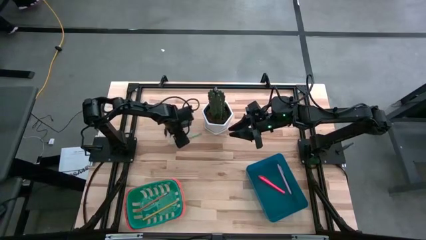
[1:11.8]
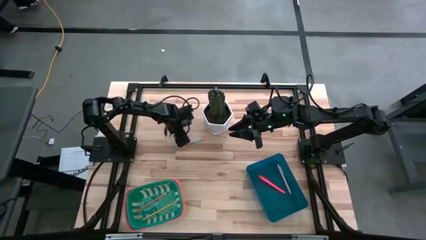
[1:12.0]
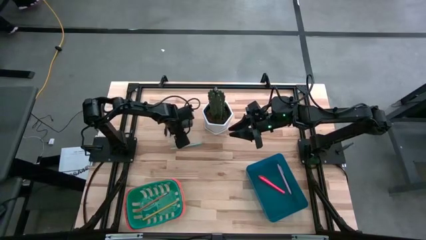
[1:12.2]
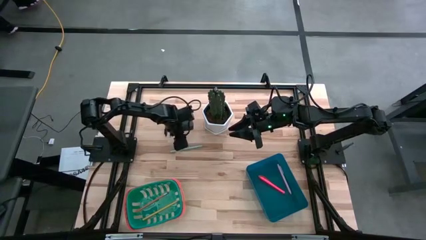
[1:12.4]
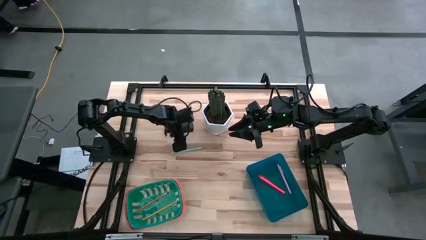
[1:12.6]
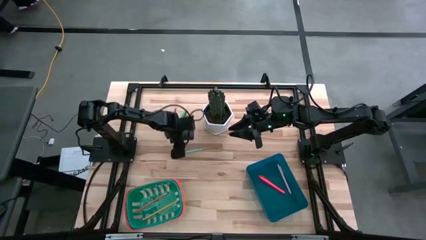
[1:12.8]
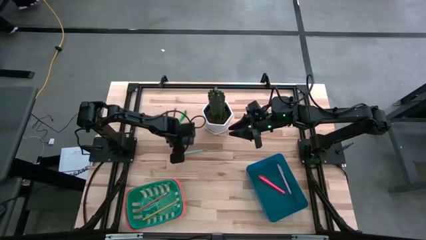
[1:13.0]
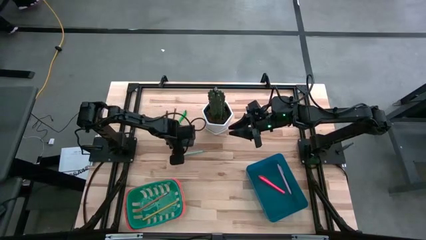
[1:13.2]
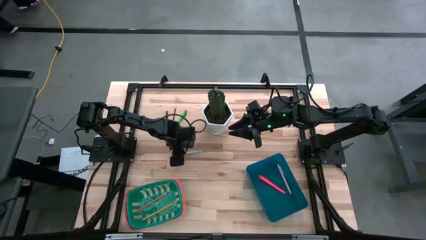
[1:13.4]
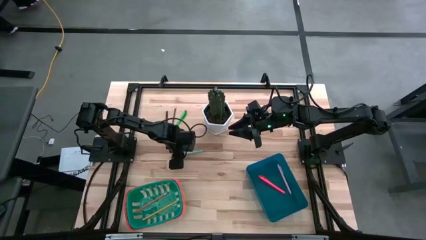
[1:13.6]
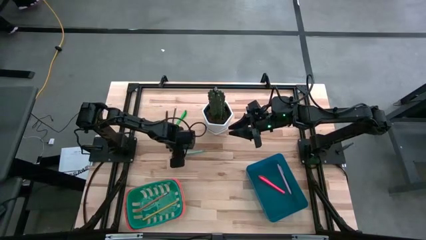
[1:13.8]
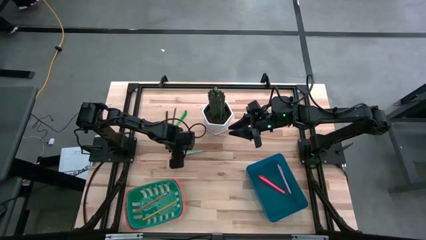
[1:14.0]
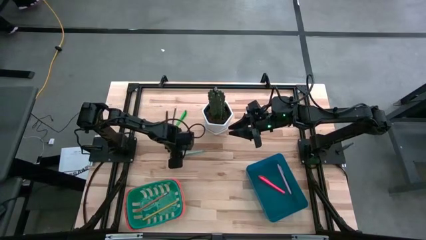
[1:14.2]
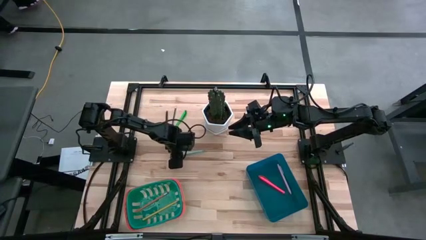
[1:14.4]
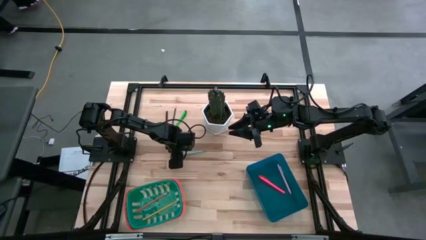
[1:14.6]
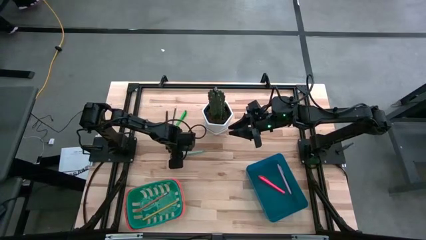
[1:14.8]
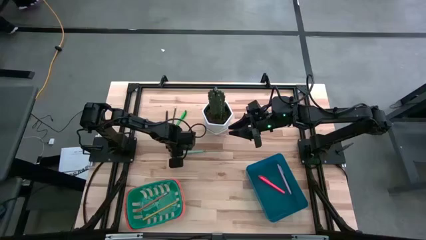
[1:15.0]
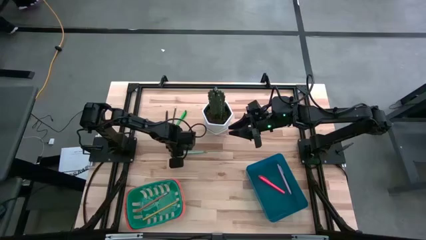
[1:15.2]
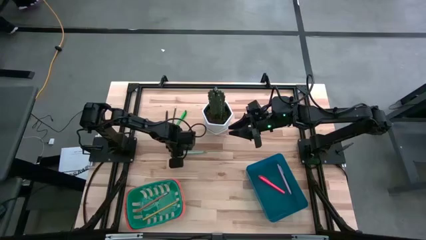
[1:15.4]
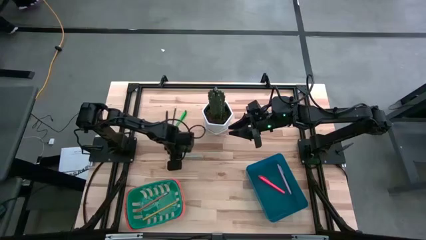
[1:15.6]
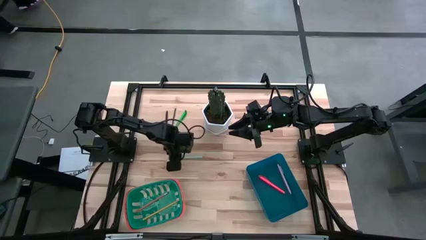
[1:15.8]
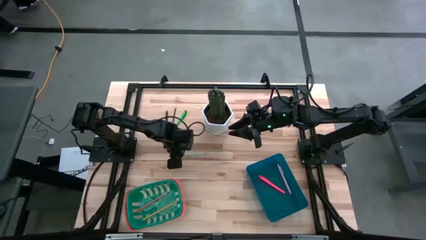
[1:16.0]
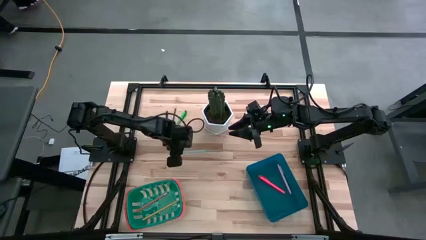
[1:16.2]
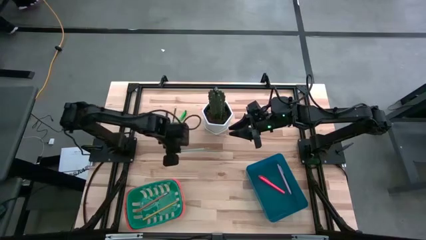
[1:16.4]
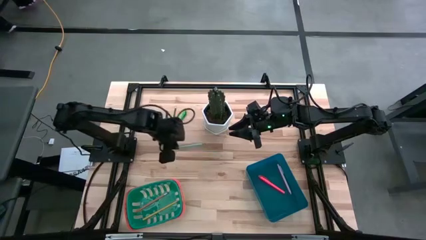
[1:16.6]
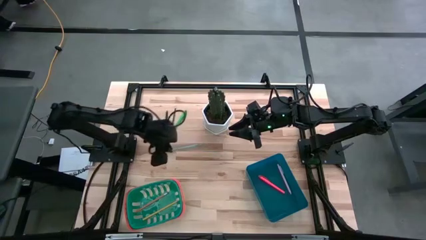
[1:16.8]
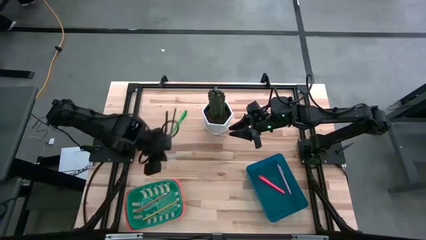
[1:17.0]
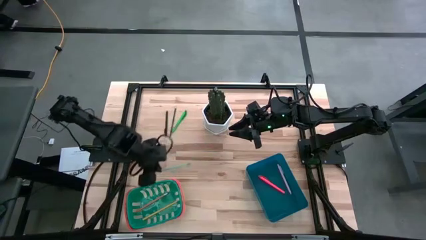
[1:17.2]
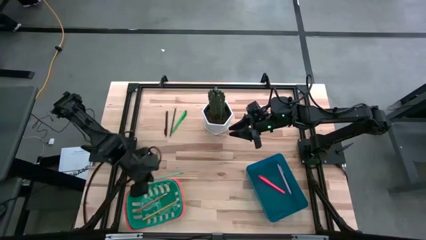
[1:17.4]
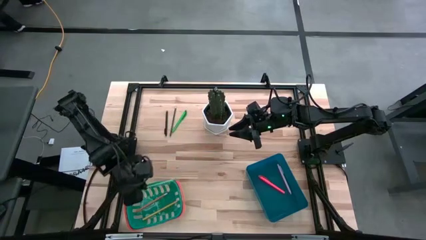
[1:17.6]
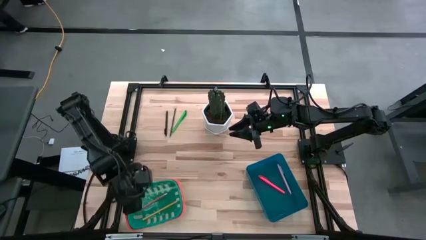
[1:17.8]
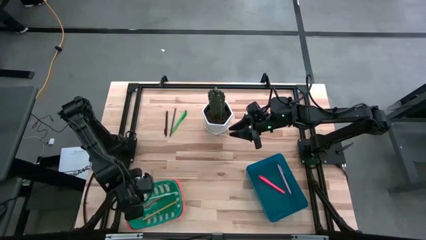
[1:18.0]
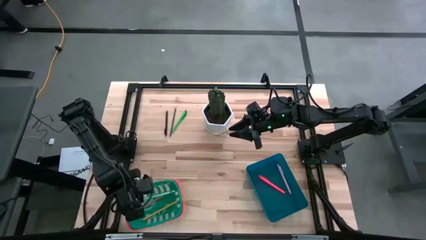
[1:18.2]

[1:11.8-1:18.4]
Task: Sort pens & pencils
Put the light blue pencil into the green bin

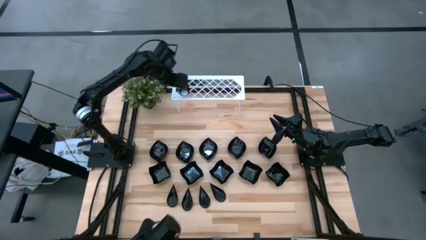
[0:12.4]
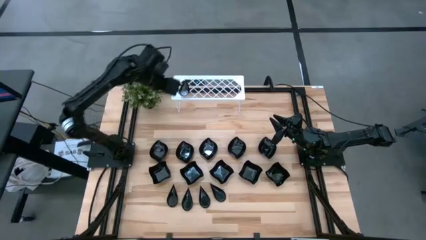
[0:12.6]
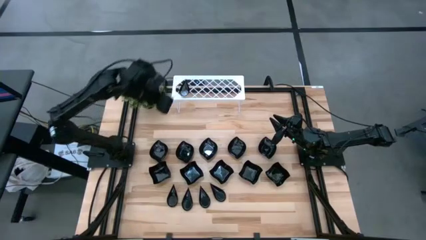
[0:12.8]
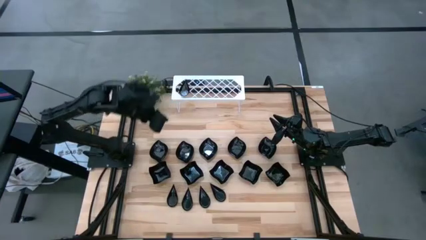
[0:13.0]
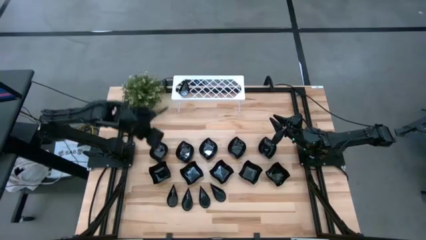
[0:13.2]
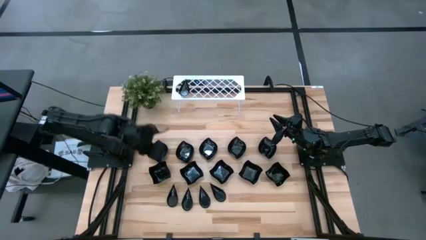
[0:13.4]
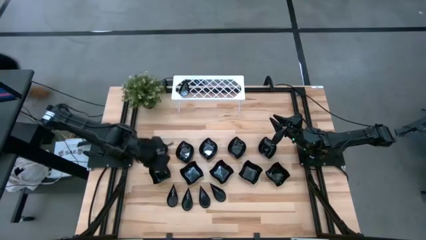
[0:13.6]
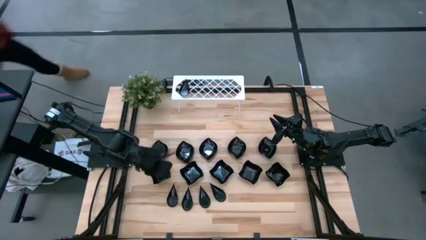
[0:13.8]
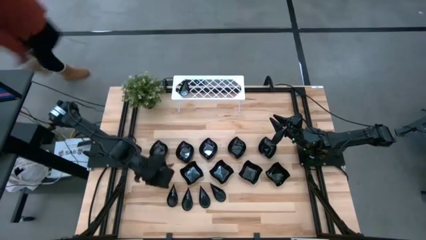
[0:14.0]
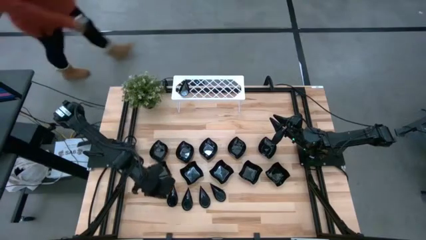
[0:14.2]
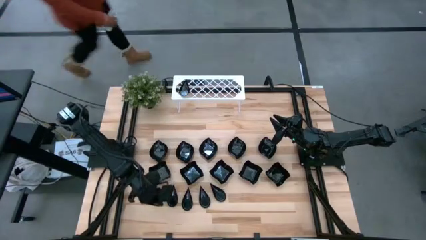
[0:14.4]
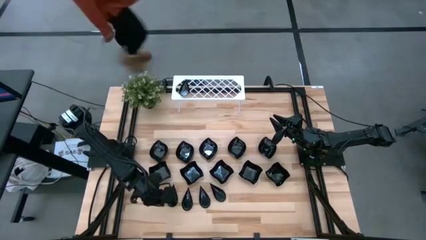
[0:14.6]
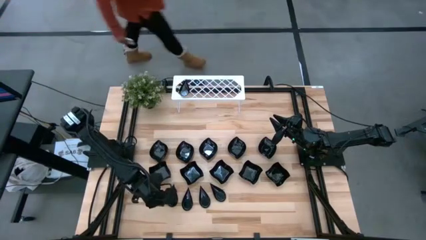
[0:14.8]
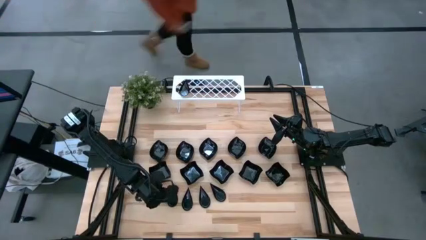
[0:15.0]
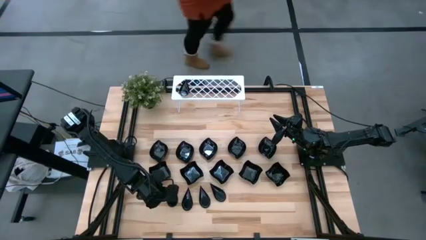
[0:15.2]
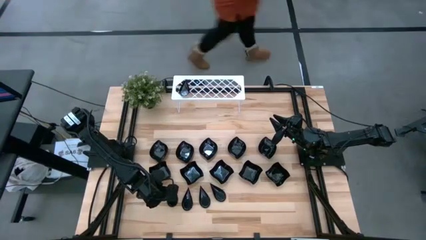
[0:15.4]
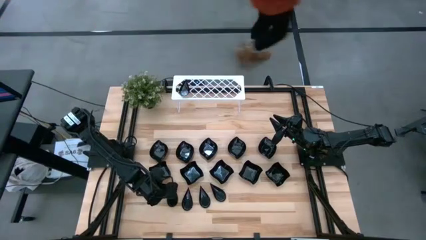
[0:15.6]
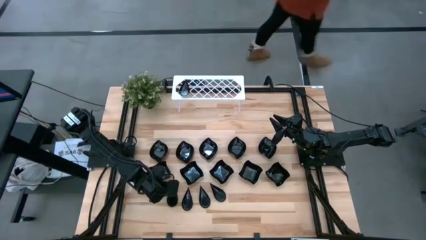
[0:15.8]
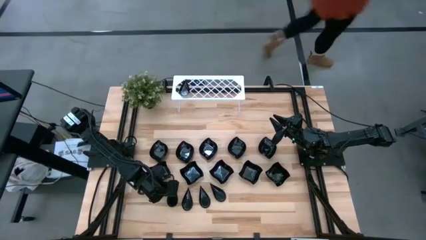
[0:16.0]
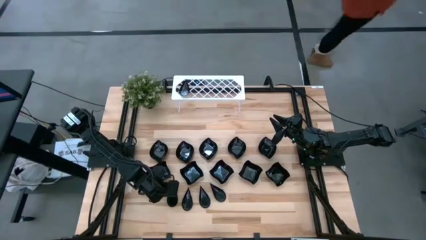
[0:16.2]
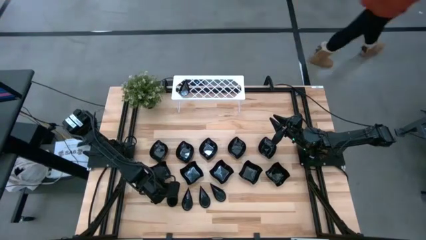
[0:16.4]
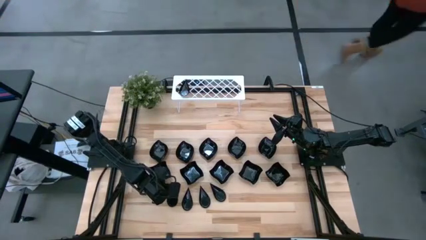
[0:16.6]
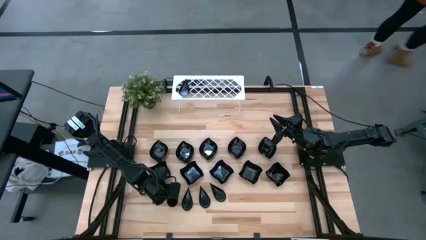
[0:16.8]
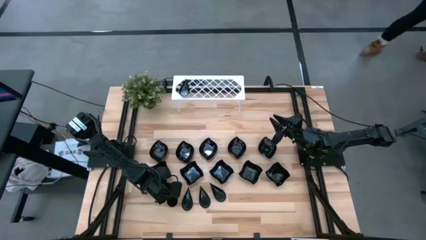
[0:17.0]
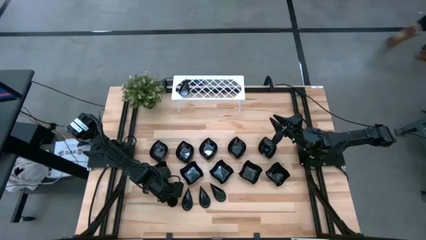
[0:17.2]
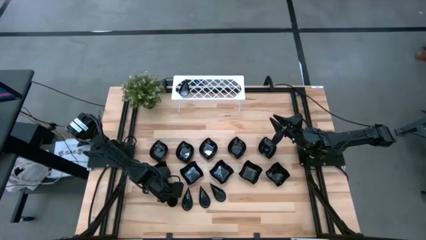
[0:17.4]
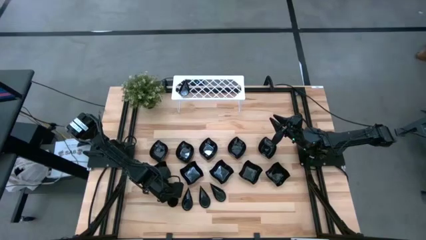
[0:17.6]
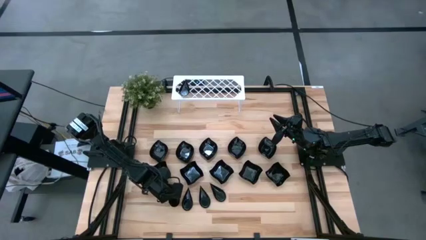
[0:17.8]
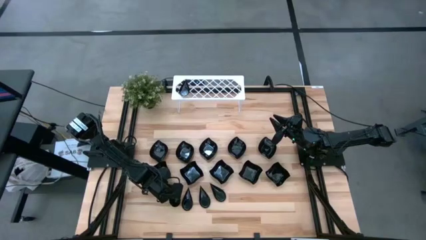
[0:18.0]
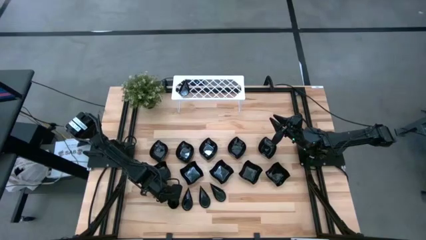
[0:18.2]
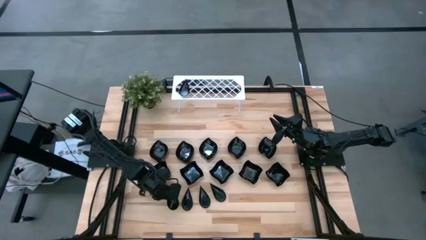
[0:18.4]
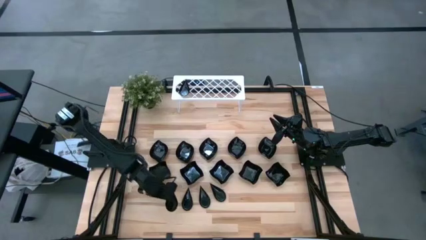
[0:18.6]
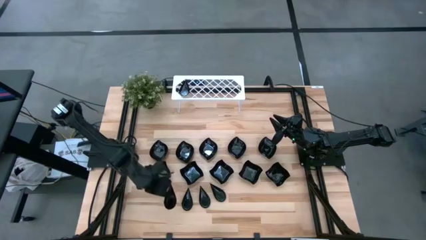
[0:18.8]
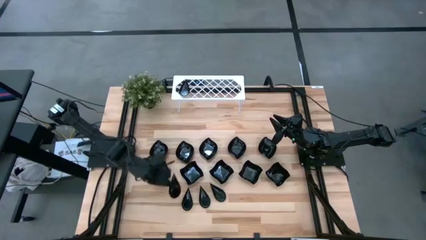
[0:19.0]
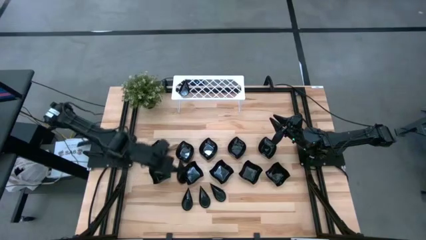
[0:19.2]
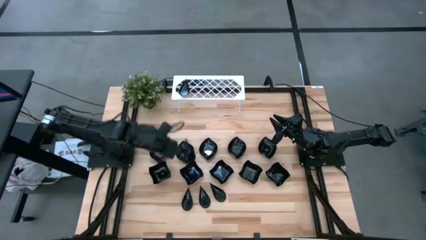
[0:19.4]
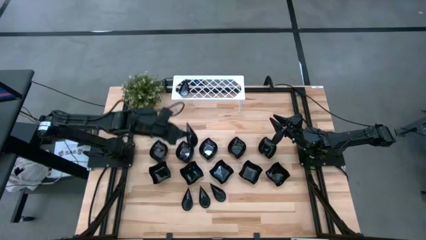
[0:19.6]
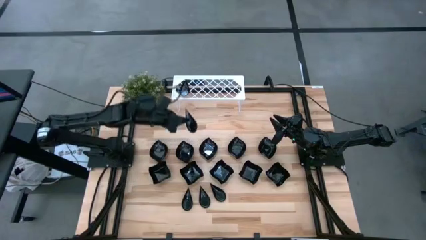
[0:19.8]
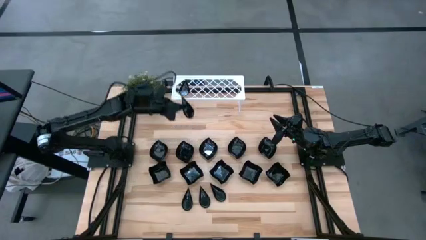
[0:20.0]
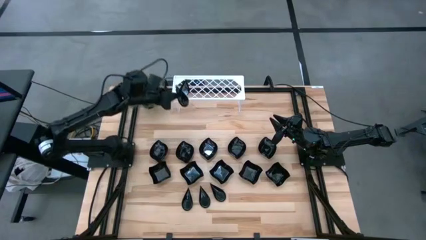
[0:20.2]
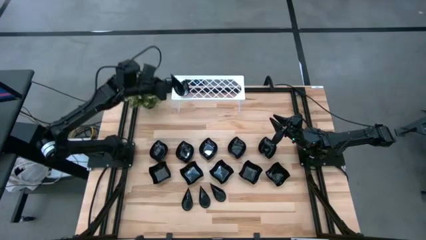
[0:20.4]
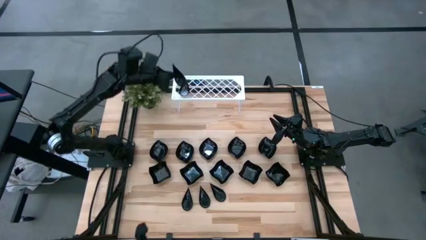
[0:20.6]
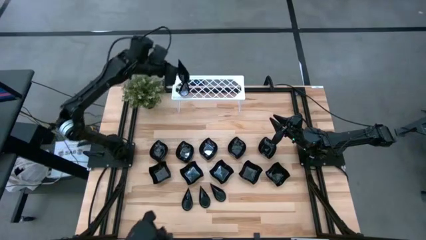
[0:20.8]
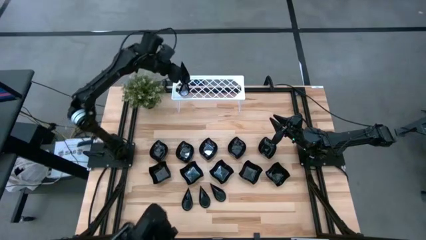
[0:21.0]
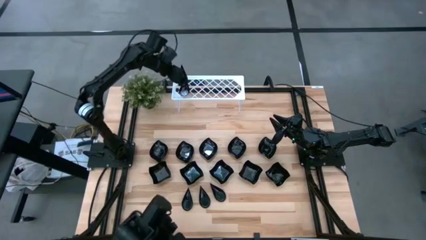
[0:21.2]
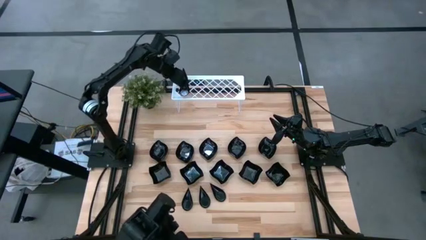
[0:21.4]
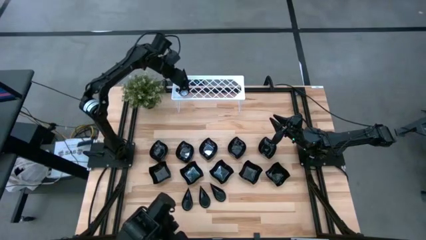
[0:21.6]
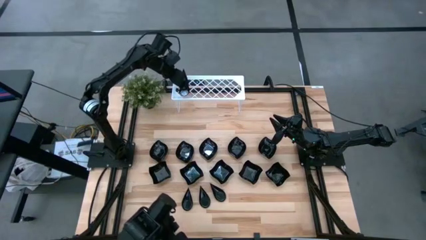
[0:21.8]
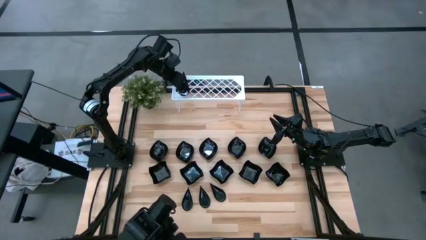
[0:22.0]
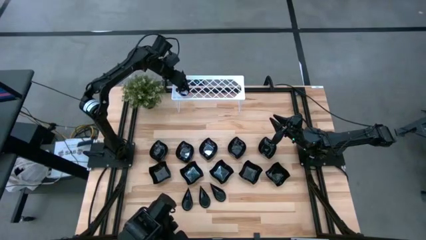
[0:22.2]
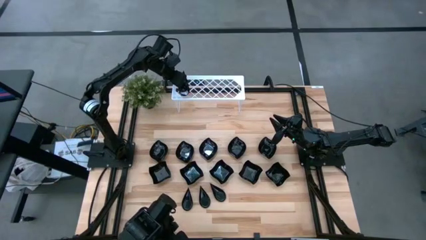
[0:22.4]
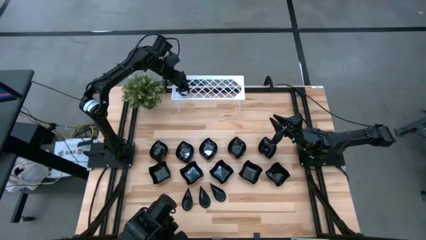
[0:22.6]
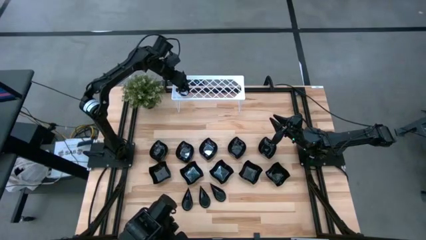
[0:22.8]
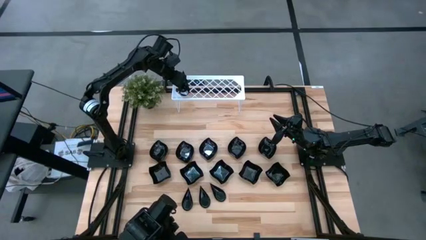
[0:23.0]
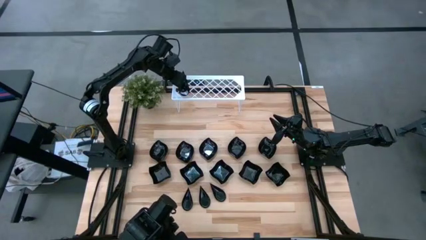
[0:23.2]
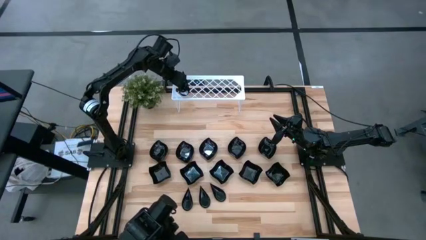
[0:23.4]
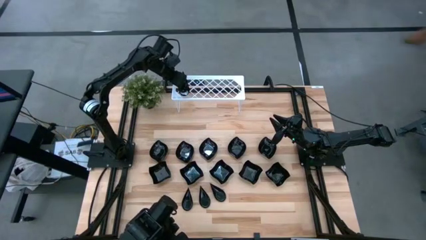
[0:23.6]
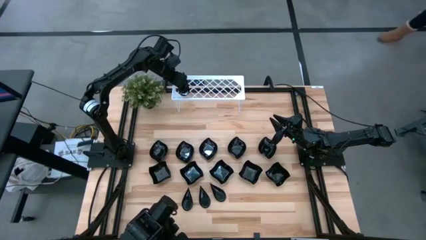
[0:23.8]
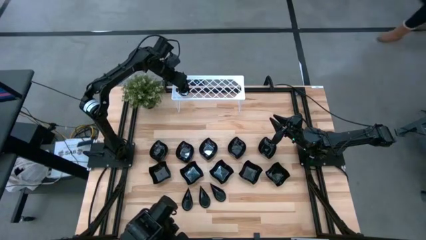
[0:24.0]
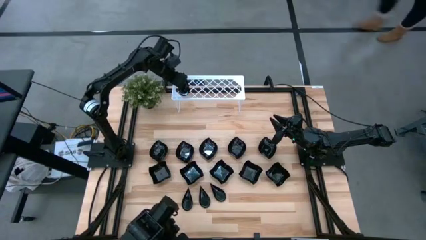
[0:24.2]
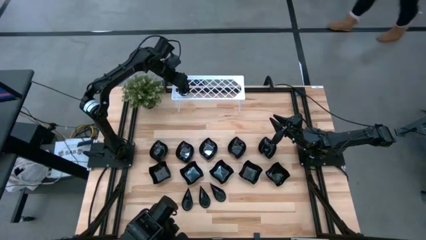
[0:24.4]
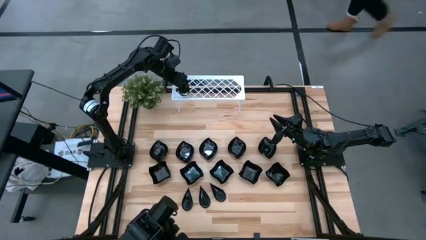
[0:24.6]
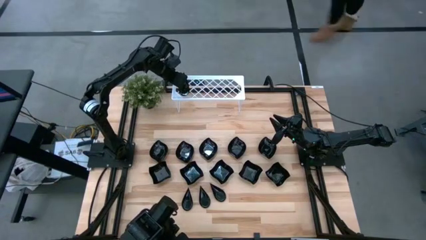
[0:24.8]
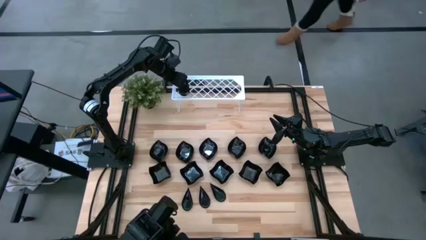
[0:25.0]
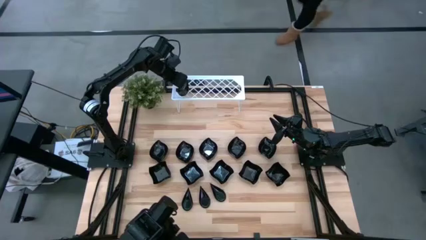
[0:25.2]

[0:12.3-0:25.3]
Task: Pick & Place Mini shaped plates
Stack the black drop shaped plate on top of the black drop shaped plate on the shelf
